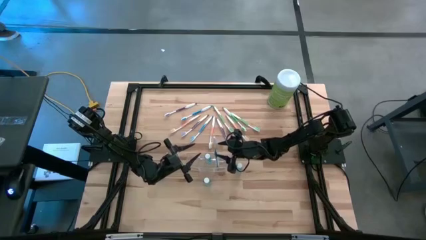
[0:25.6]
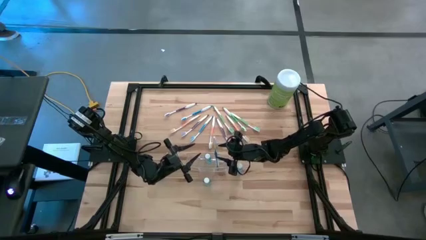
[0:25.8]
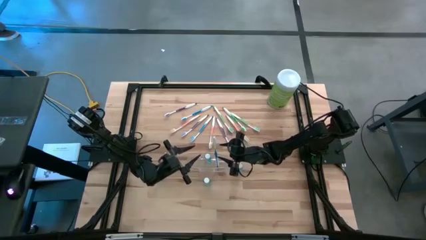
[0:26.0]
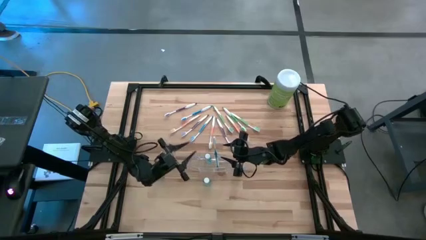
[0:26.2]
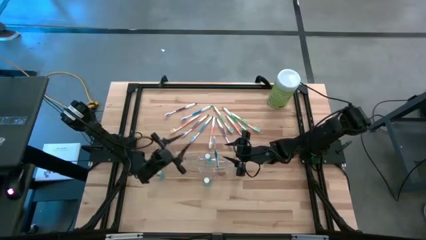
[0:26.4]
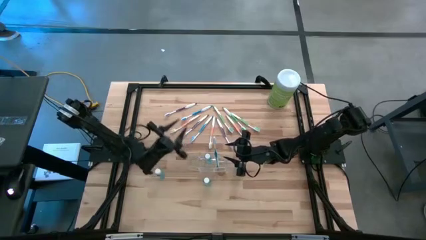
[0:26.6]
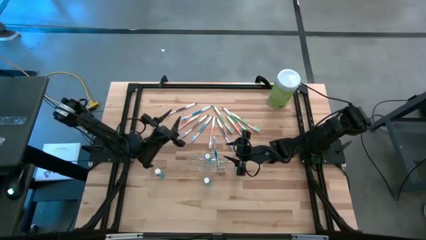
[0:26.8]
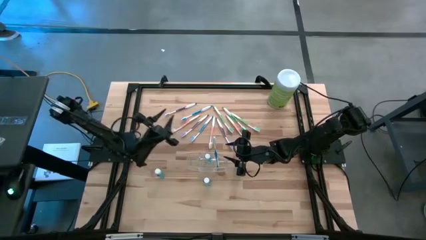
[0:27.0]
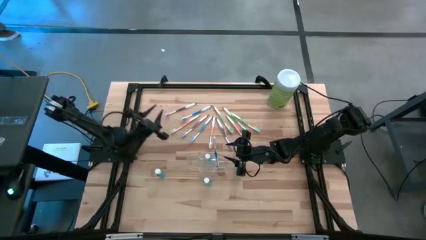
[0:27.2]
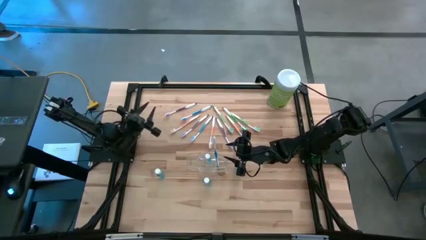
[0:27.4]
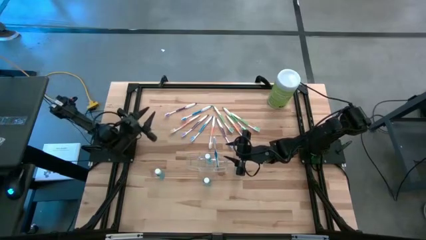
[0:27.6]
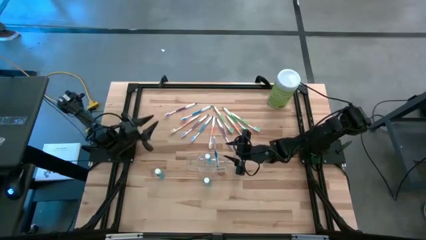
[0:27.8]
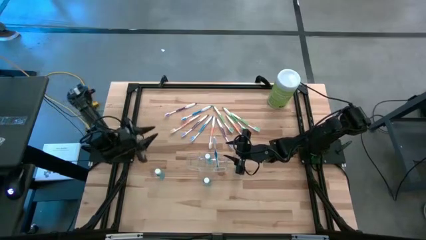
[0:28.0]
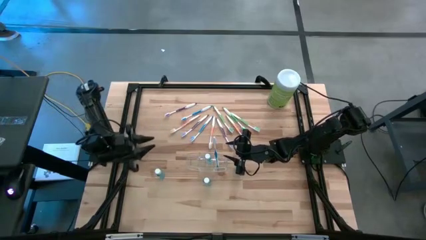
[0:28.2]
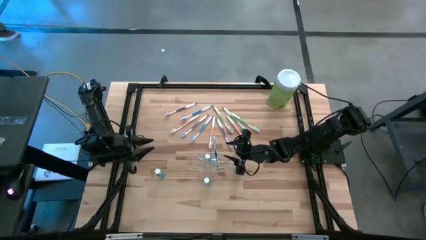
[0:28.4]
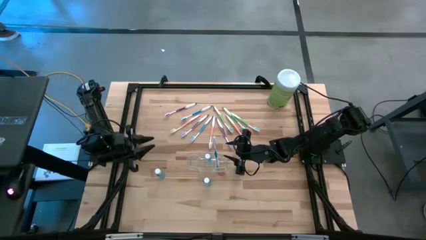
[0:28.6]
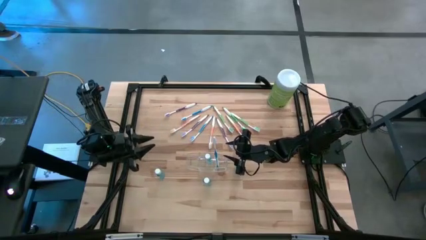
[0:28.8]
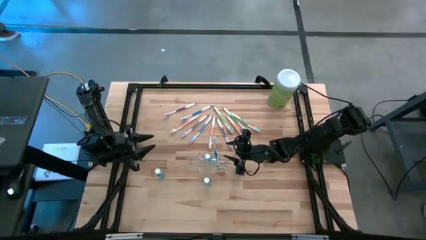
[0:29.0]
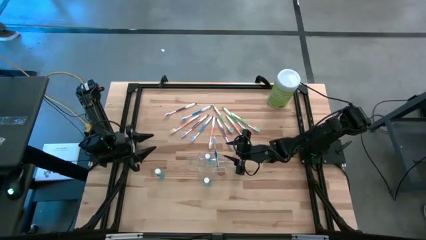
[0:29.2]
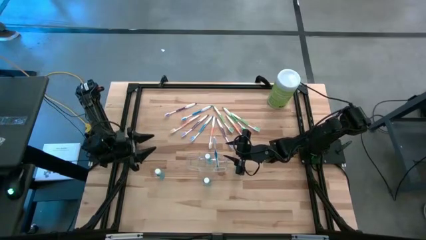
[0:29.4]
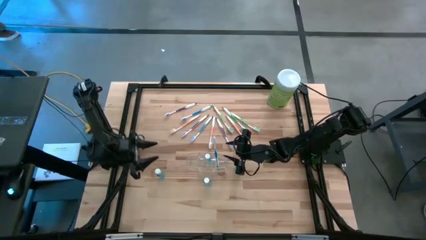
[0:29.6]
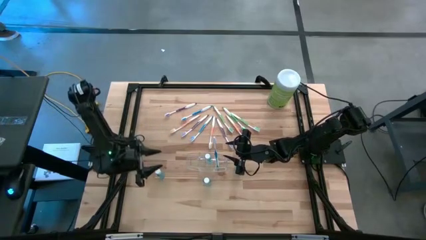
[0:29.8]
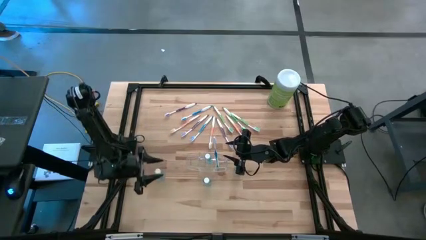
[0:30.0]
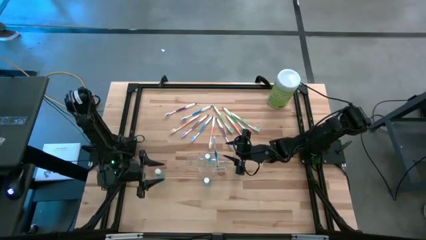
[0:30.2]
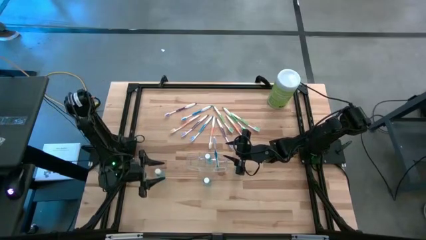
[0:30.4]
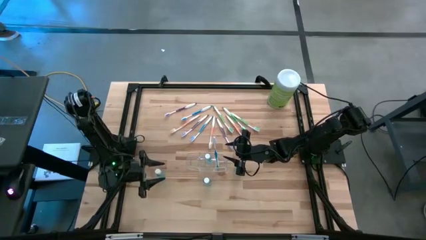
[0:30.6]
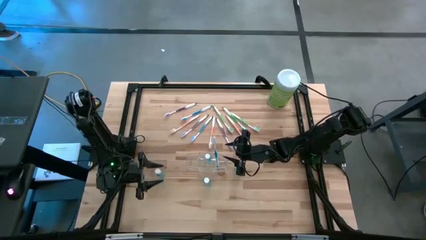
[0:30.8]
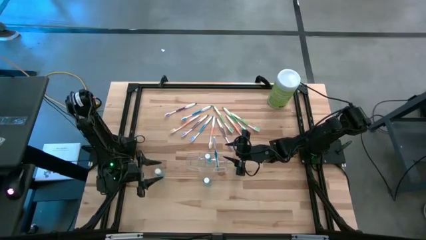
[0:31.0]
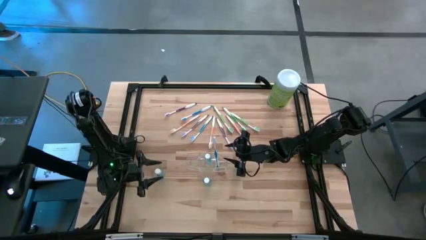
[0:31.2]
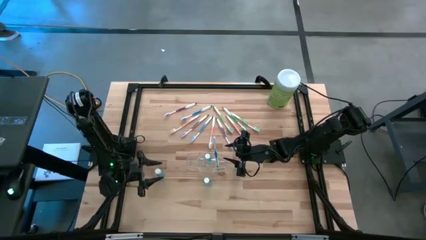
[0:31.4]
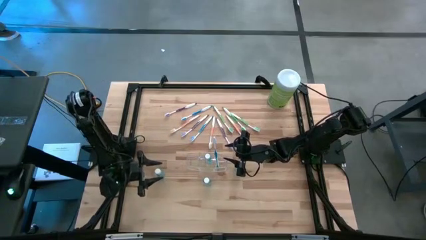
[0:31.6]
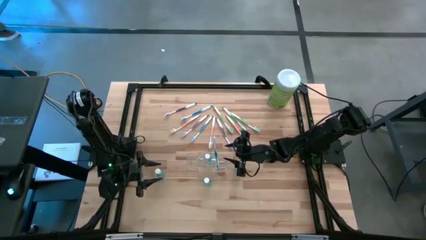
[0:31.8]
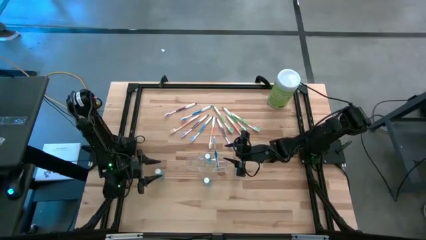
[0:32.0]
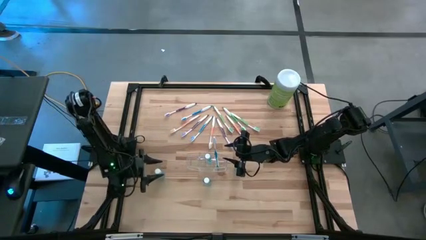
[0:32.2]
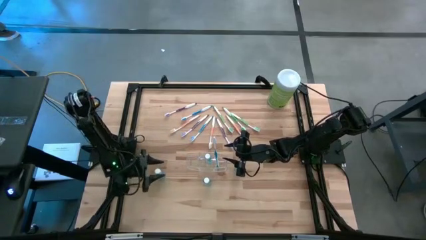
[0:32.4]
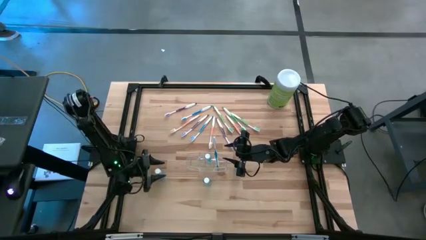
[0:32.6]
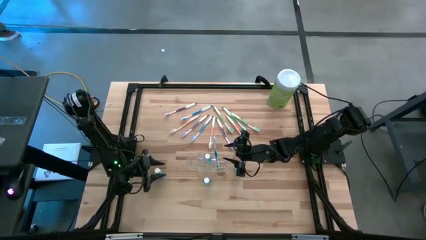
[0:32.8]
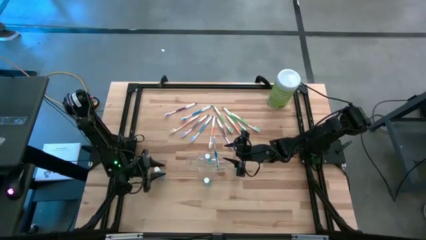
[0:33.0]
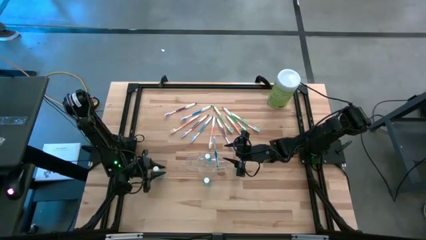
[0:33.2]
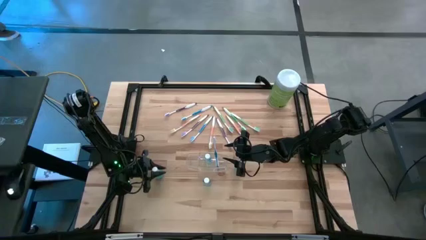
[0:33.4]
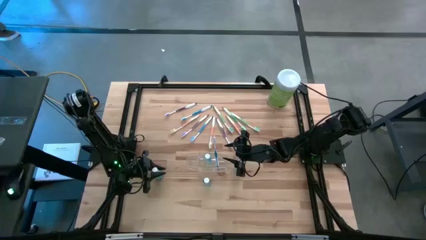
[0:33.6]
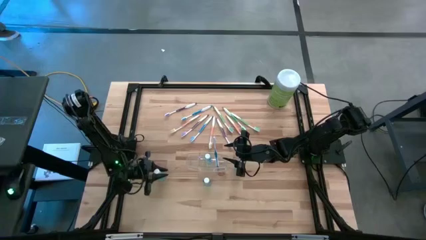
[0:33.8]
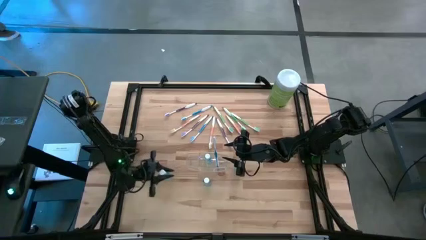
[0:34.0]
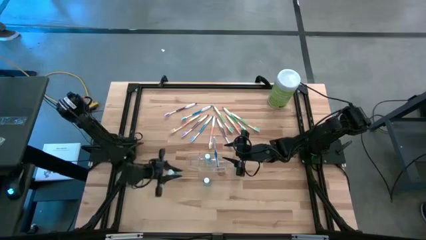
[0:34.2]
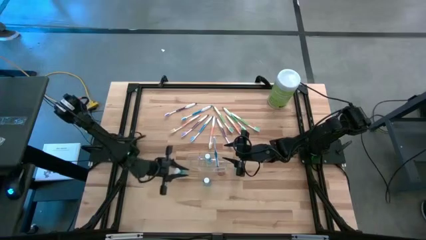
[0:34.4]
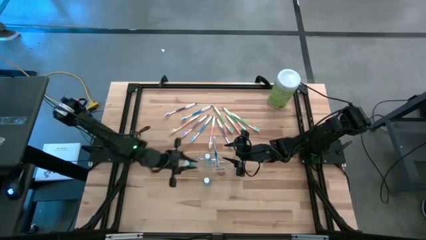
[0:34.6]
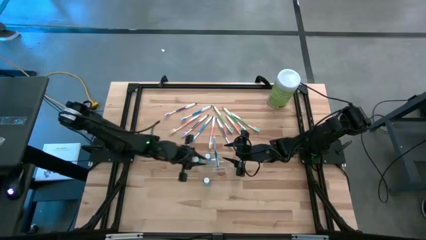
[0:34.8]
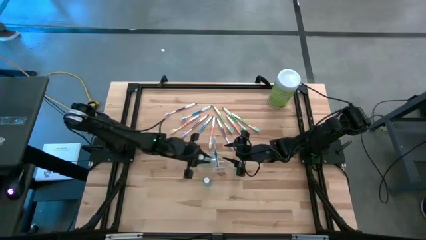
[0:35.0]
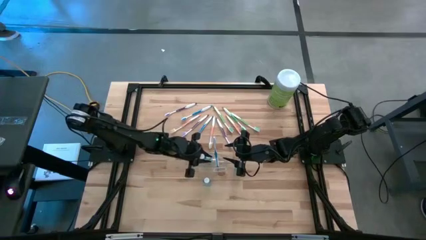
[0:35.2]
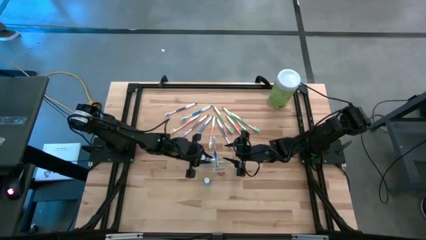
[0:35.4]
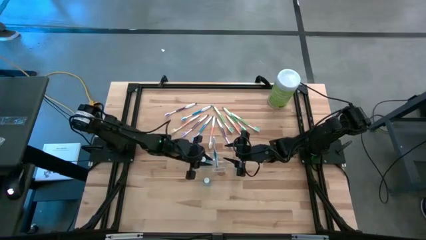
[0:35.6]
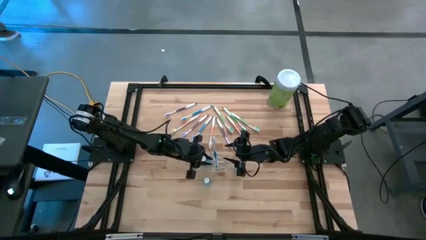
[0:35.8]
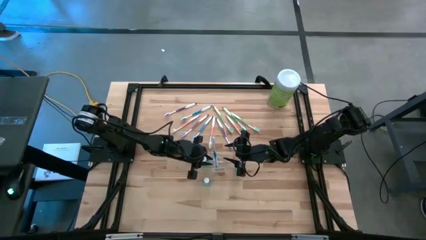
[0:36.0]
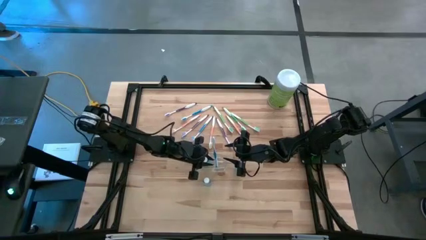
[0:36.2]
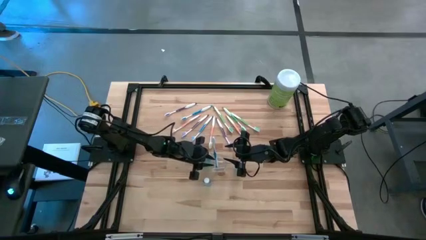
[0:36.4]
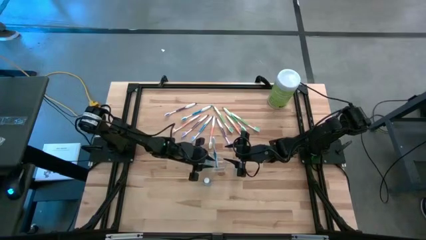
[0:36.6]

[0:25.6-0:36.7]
Task: Pick & Place toothbrushing station
Put the blue mouthwash into the transparent organizer
